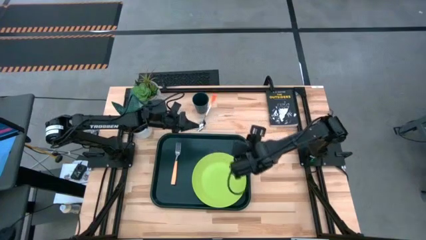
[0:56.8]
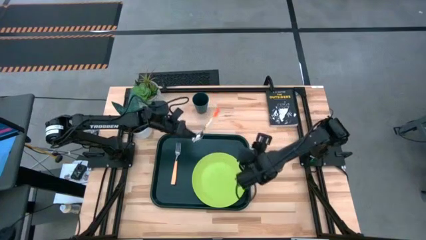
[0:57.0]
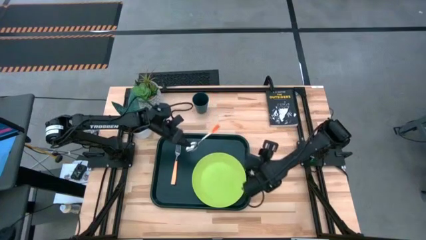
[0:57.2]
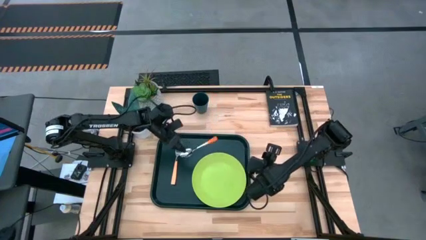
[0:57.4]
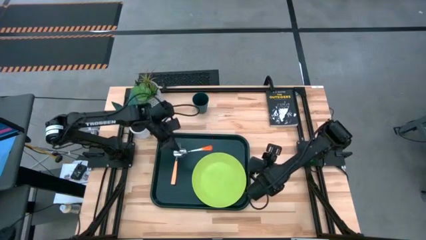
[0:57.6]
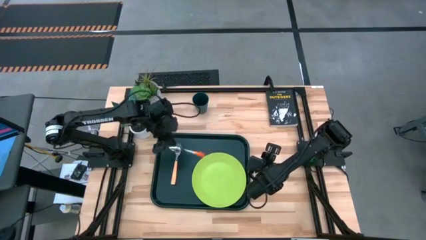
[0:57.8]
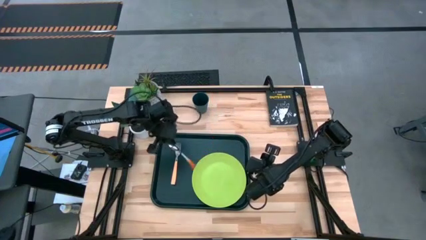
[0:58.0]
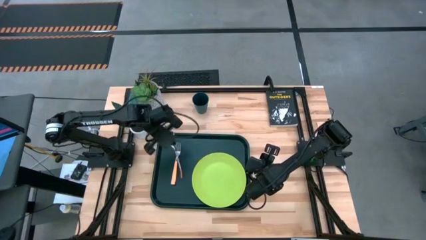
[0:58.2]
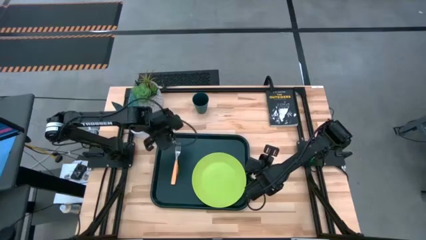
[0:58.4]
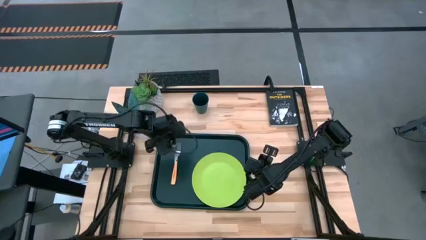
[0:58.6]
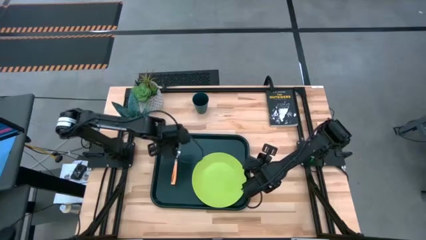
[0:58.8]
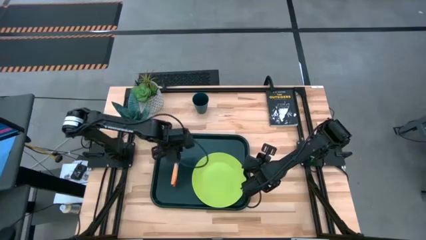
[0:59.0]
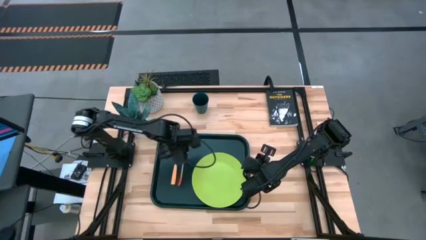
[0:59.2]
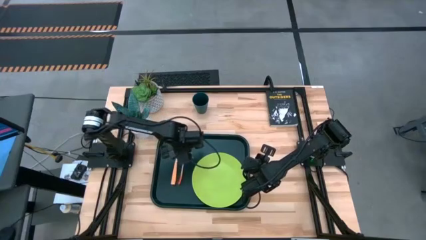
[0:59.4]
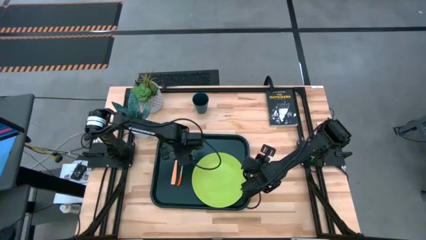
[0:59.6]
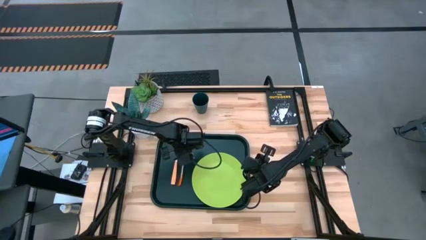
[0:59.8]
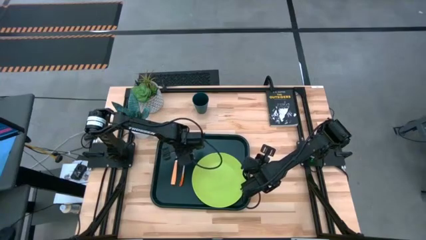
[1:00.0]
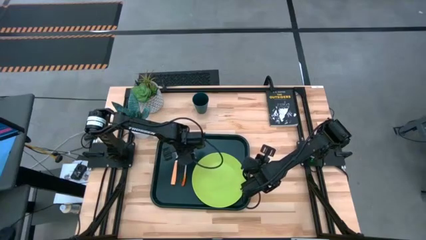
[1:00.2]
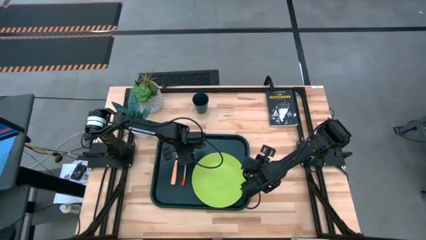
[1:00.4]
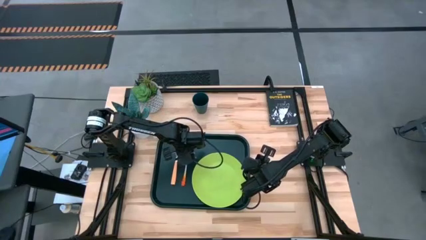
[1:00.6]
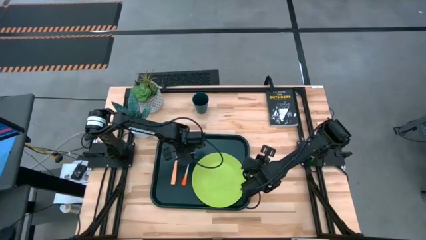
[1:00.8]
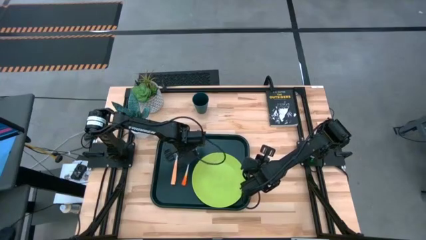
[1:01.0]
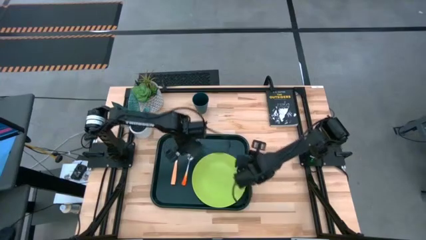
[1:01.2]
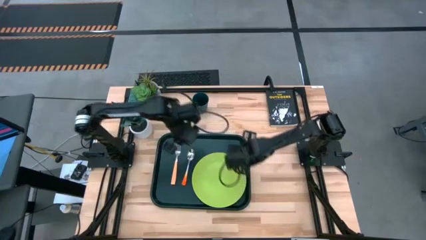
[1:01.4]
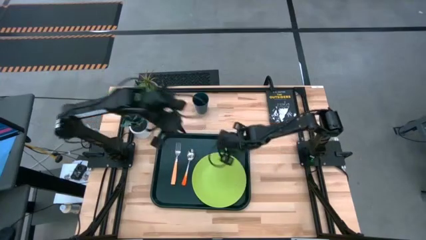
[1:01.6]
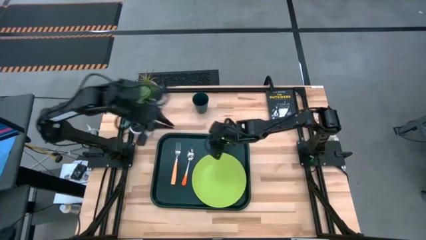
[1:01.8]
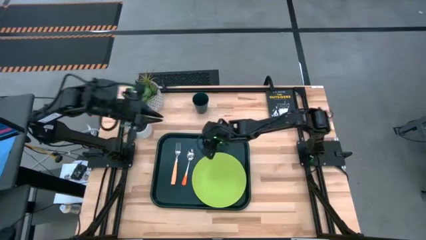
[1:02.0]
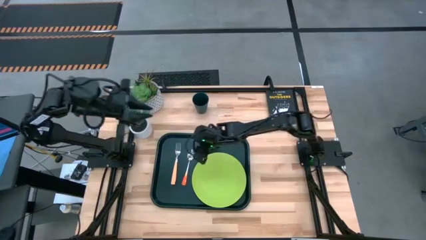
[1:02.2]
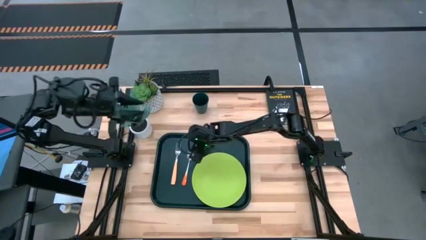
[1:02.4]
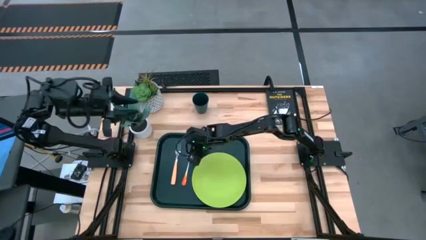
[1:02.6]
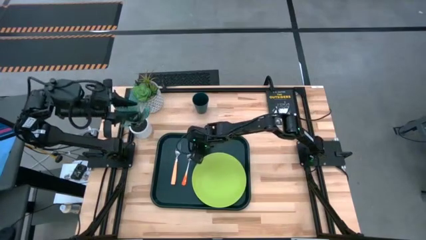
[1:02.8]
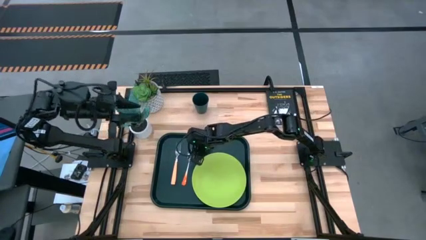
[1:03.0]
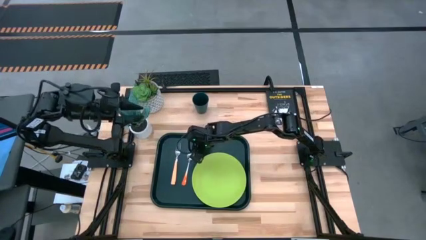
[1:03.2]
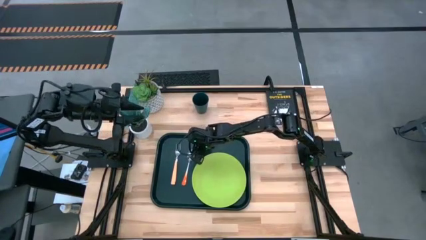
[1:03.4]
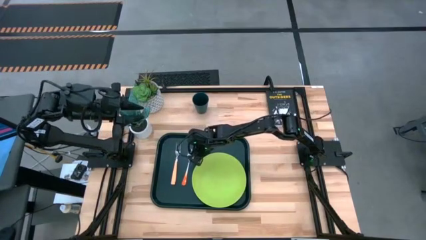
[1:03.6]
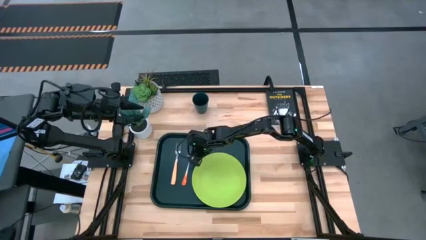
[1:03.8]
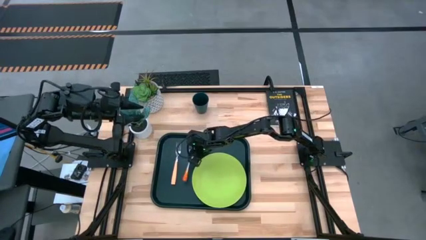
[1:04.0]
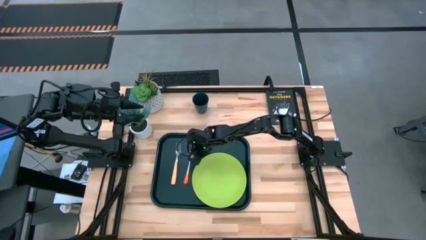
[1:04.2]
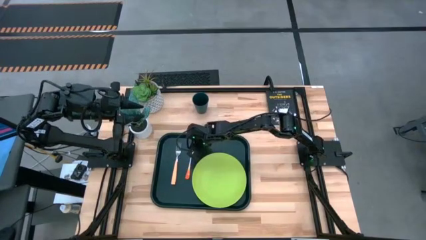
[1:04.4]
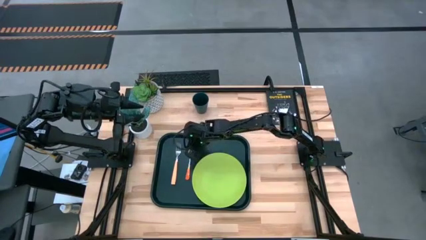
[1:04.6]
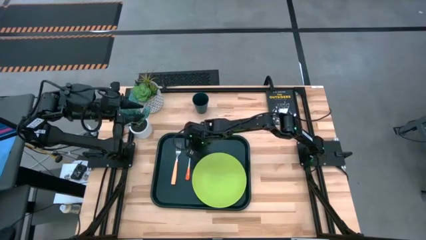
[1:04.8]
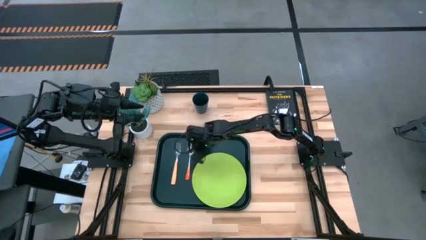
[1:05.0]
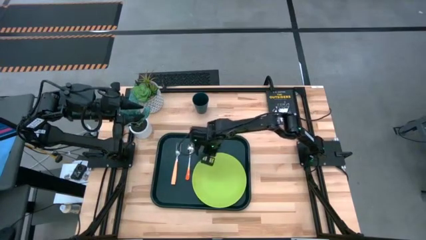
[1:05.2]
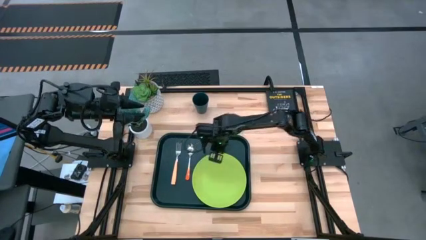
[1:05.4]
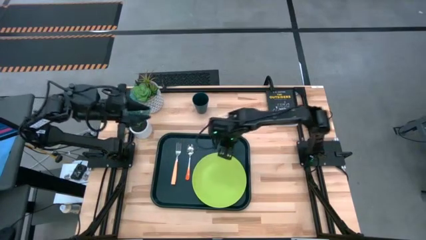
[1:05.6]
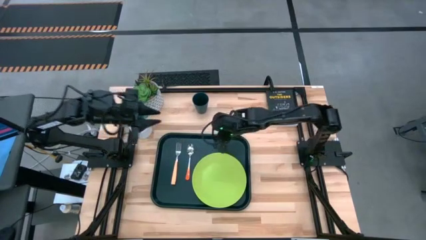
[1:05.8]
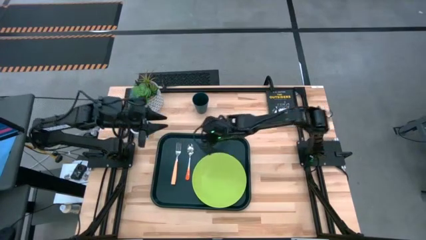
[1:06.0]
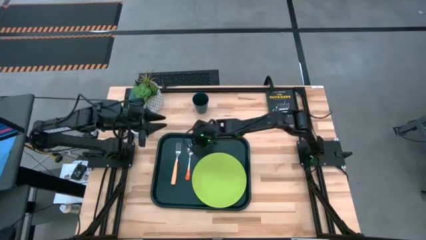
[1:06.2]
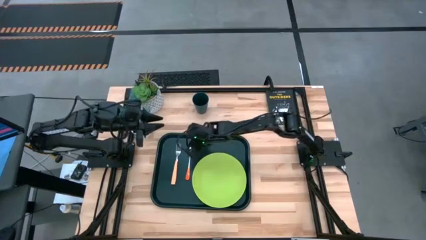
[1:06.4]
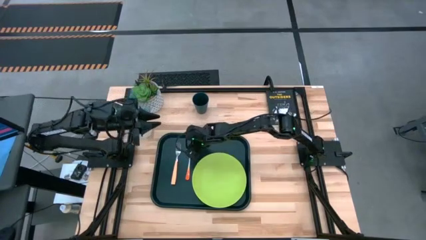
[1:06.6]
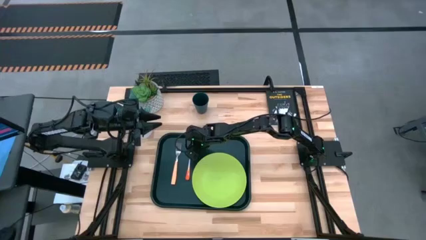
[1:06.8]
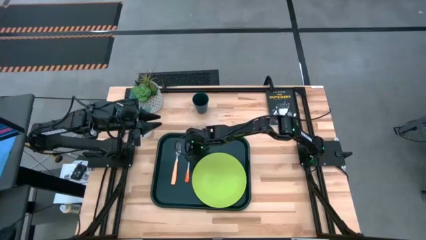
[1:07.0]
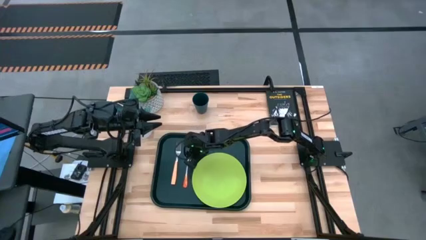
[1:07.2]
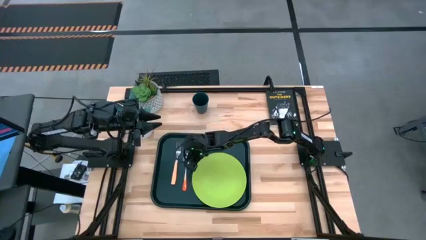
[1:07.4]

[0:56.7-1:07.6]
Task: Pick and place plate/cup/fork/spoon on tray
Put the orange spoon on the black tray to the left of the green plate

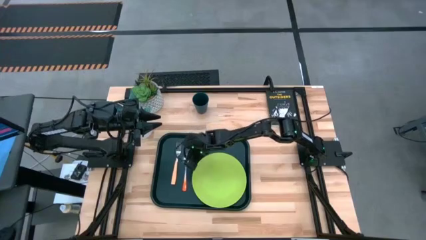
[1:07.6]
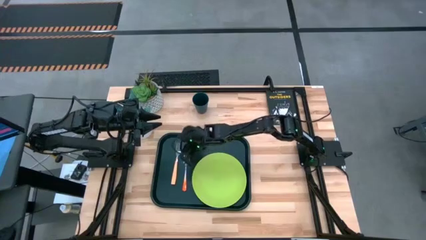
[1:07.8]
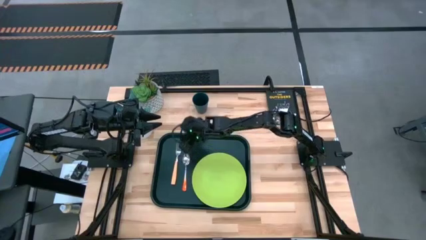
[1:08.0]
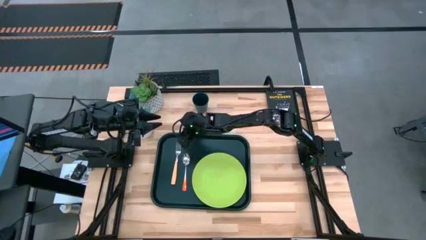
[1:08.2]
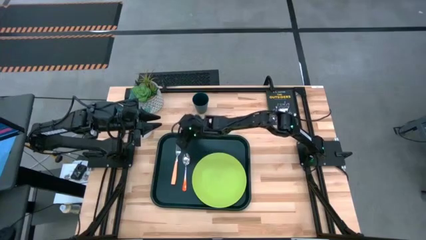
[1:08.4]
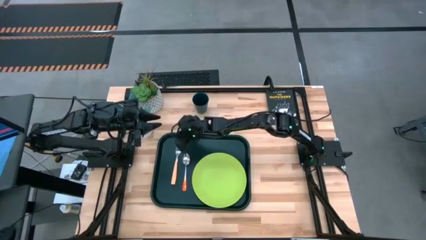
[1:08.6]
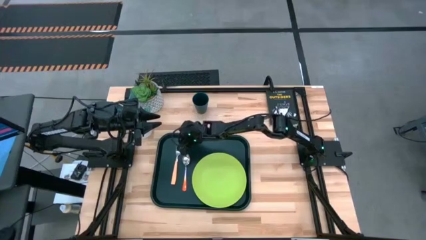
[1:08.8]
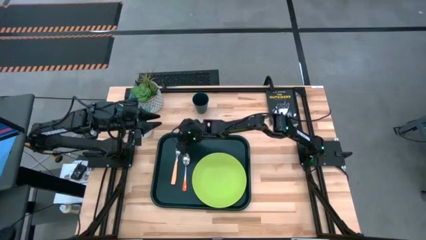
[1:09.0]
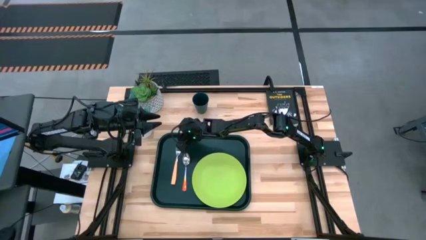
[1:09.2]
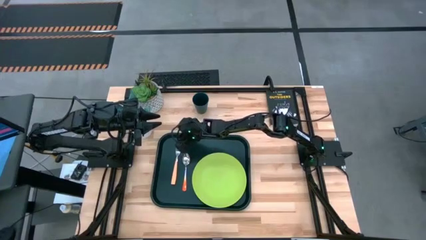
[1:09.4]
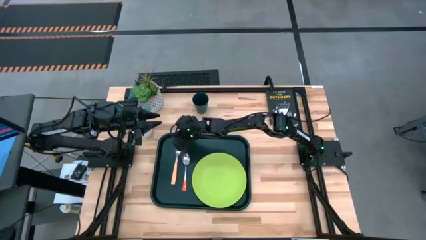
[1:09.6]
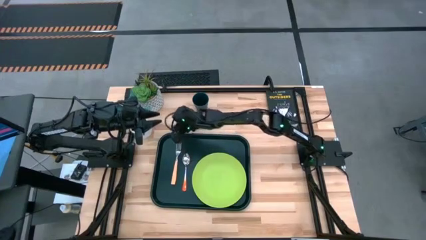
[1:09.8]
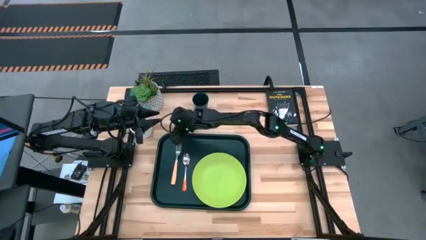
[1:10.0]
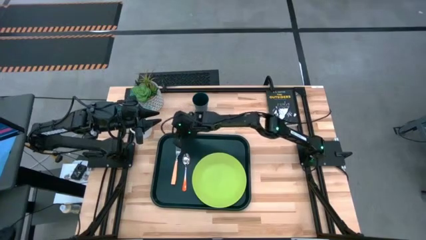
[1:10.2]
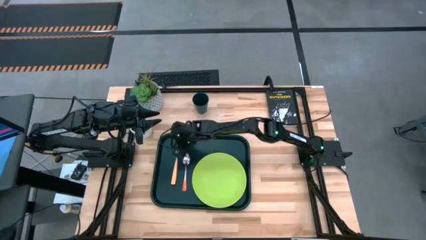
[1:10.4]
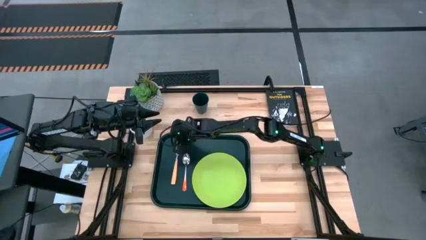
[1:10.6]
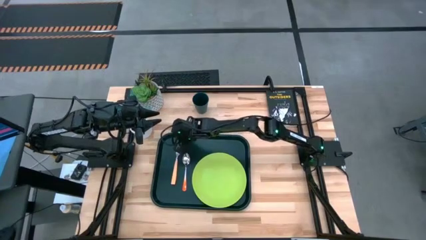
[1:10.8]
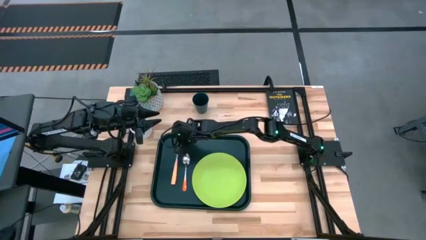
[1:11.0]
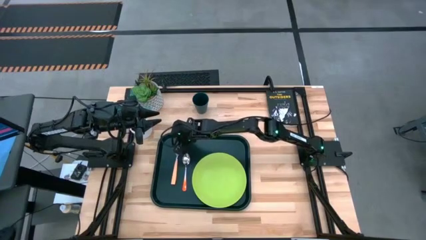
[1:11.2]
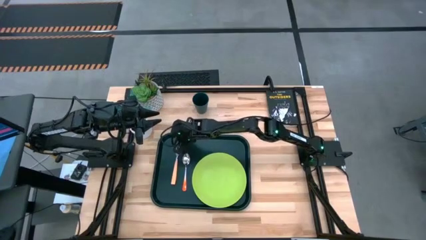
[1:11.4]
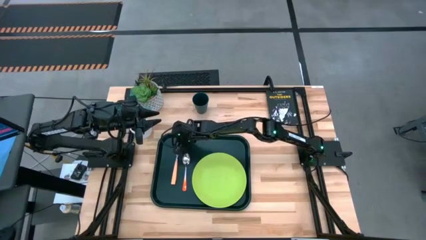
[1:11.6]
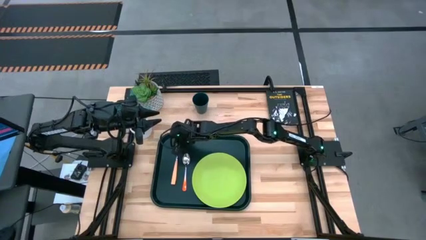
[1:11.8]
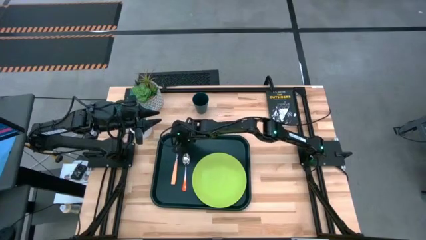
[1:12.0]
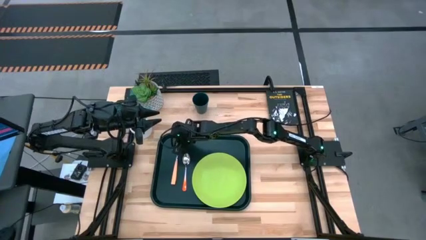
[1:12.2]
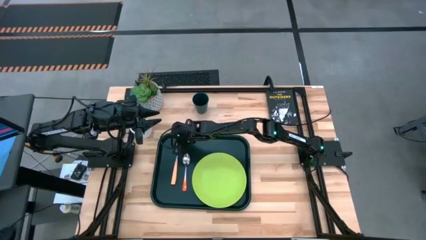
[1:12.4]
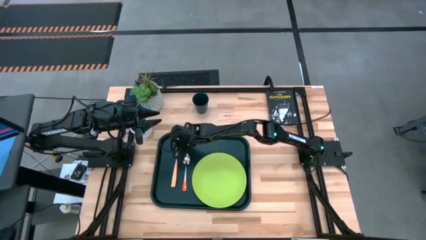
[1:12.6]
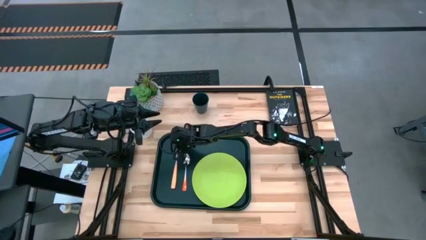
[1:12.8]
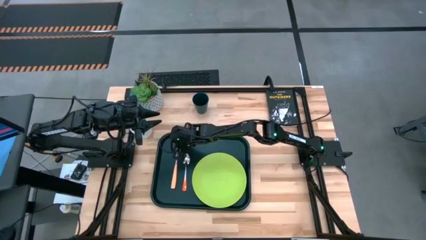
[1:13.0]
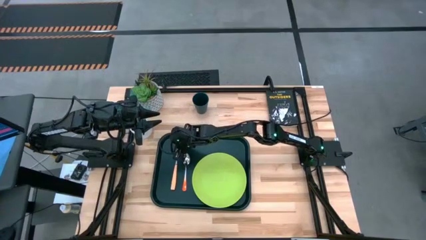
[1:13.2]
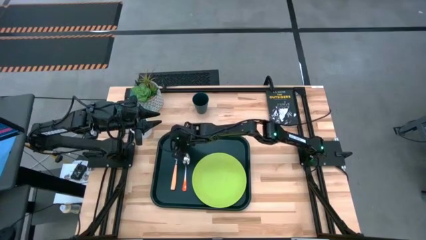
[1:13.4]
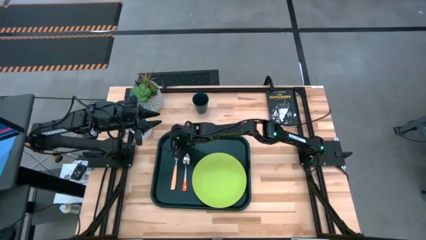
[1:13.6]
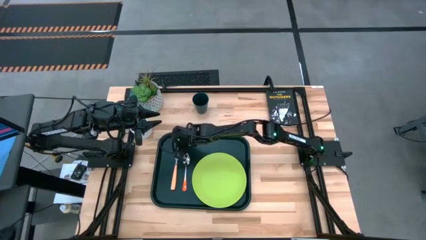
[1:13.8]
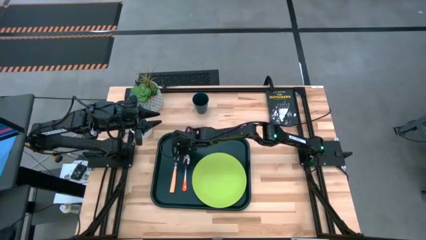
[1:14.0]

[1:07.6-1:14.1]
Adjust the orange fork on the black tray

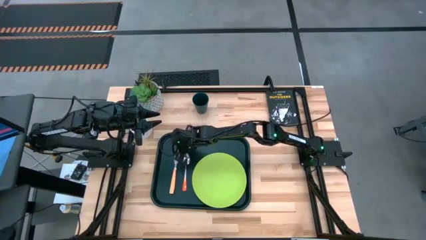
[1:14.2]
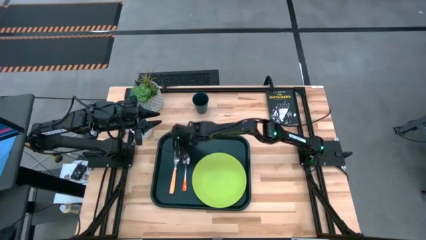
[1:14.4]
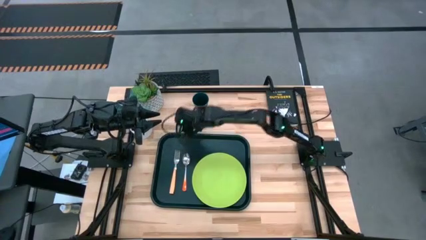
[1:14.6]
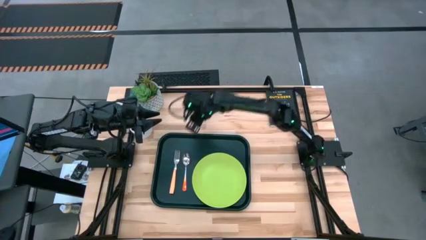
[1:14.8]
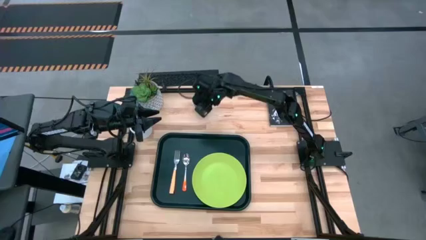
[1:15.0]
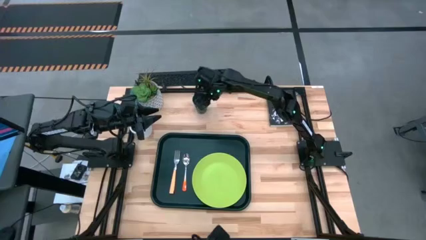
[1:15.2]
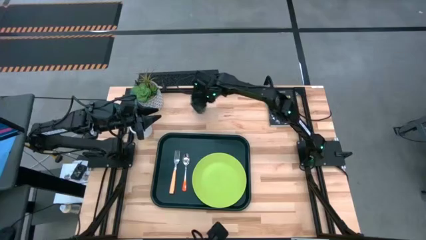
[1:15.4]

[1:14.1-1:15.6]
Put the blue cup on the black tray to the top right of the green plate
